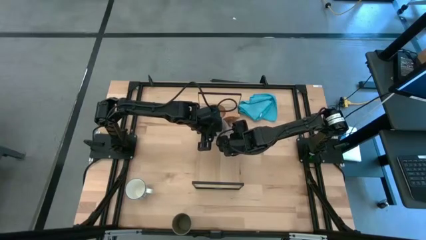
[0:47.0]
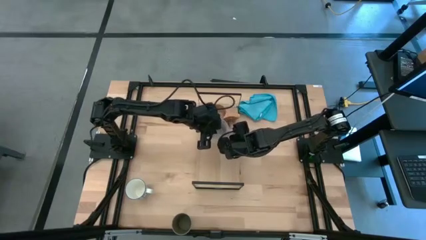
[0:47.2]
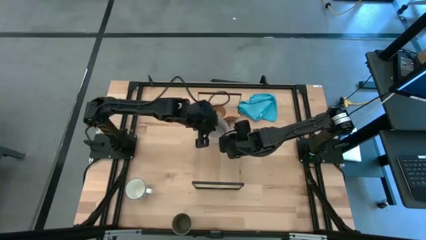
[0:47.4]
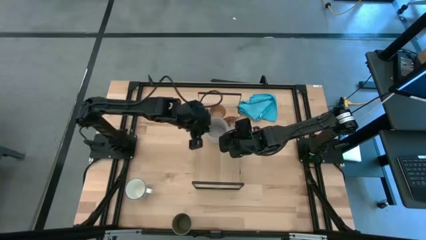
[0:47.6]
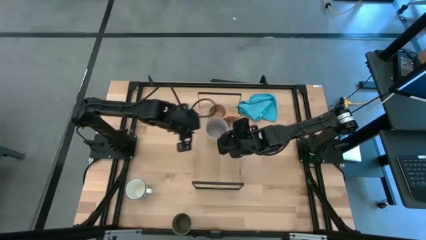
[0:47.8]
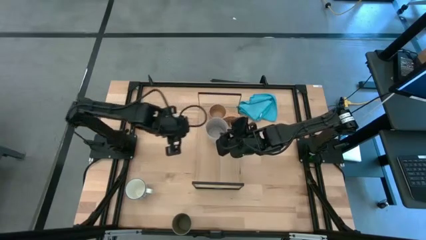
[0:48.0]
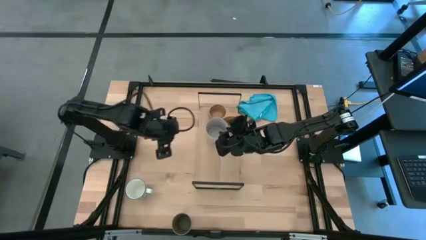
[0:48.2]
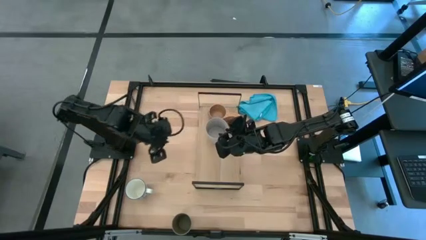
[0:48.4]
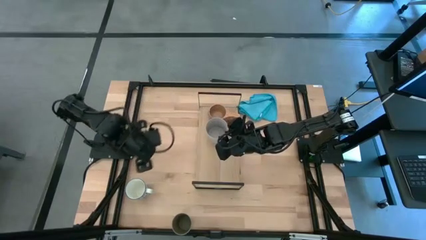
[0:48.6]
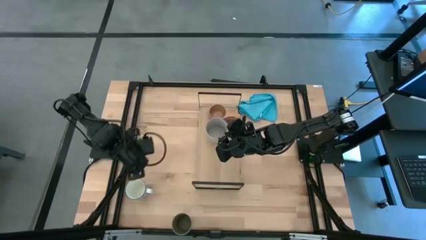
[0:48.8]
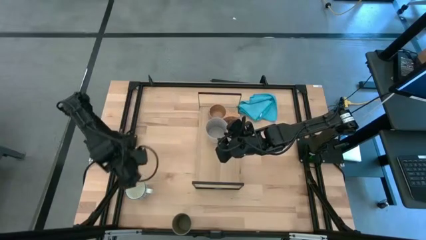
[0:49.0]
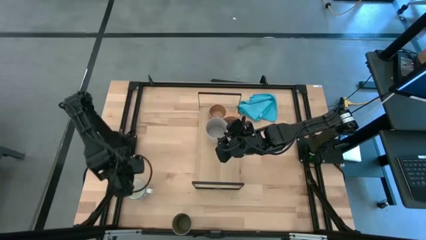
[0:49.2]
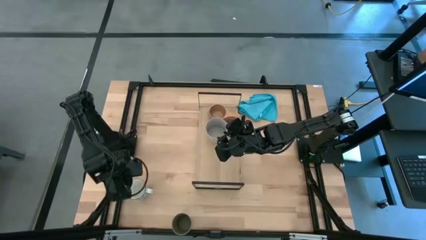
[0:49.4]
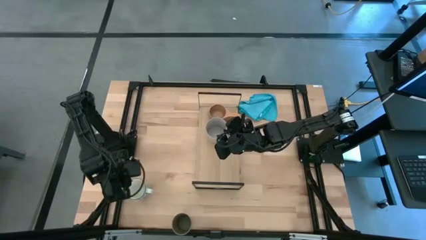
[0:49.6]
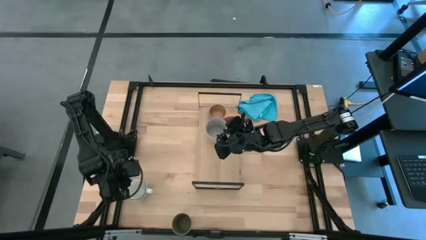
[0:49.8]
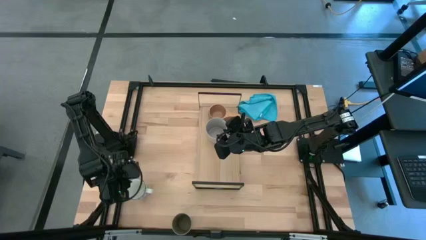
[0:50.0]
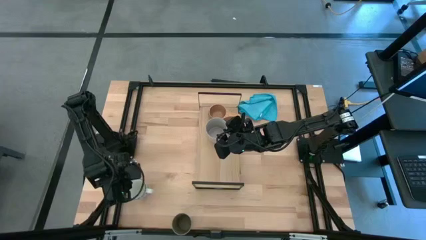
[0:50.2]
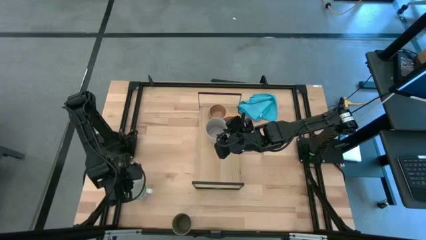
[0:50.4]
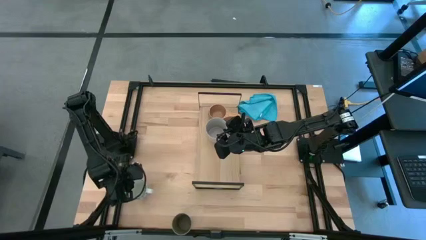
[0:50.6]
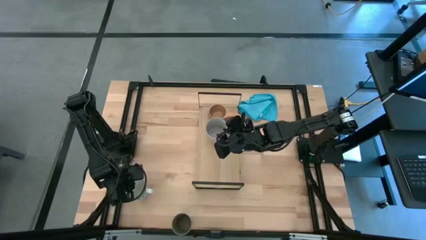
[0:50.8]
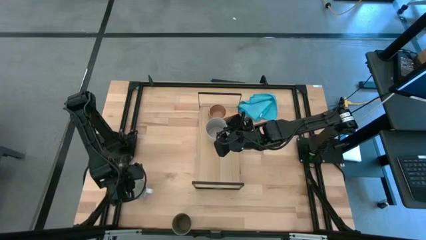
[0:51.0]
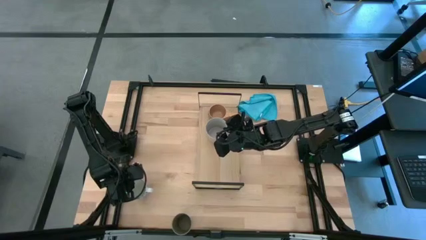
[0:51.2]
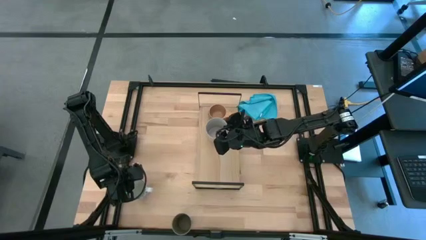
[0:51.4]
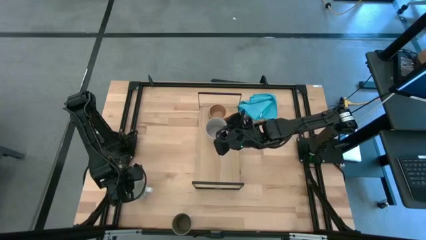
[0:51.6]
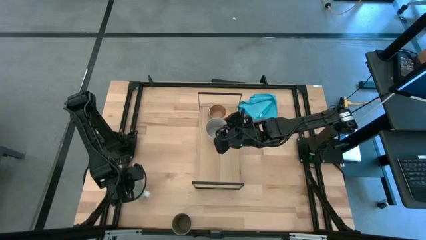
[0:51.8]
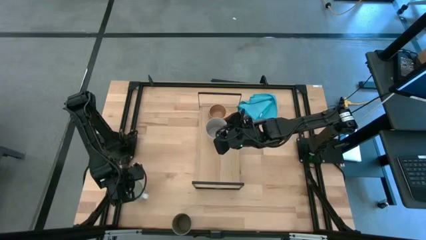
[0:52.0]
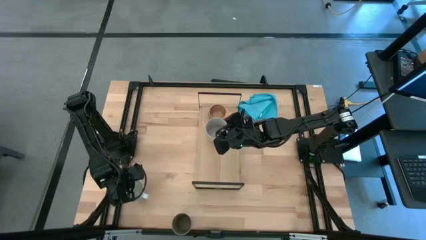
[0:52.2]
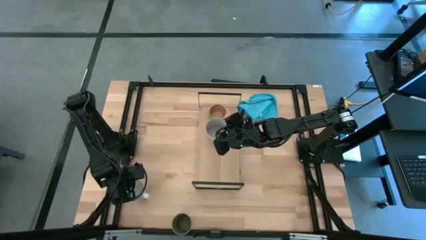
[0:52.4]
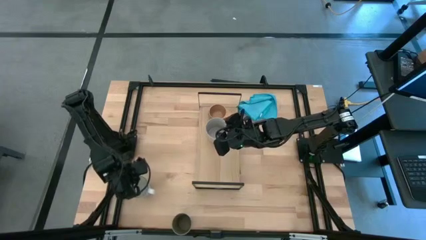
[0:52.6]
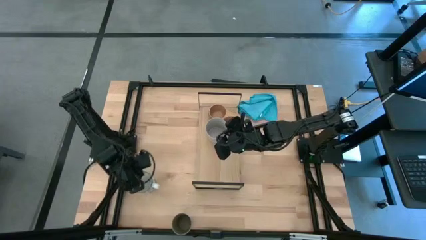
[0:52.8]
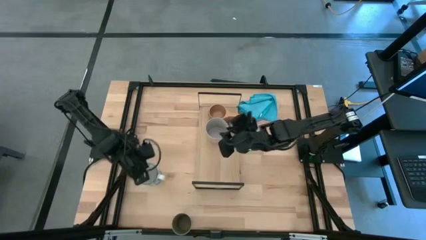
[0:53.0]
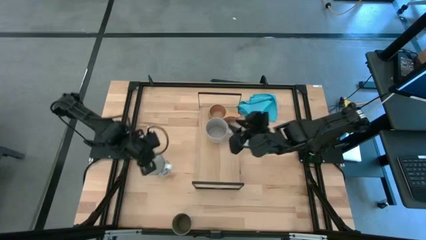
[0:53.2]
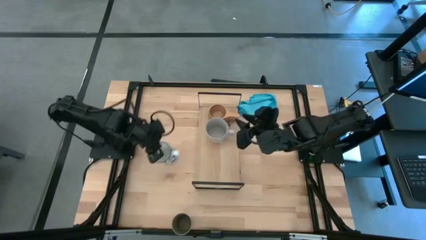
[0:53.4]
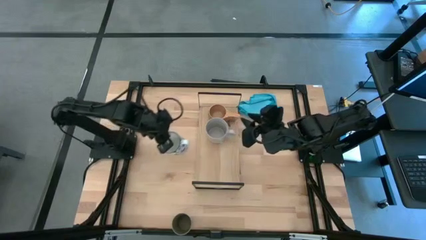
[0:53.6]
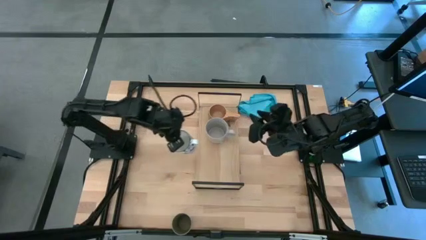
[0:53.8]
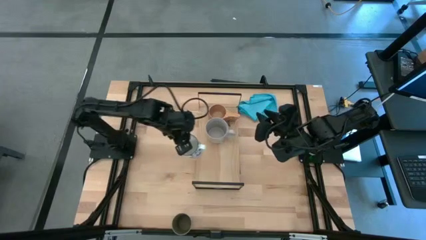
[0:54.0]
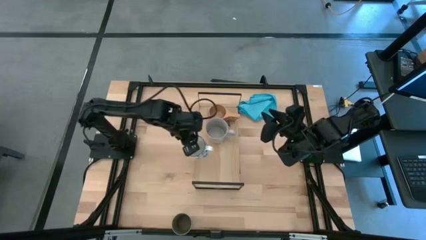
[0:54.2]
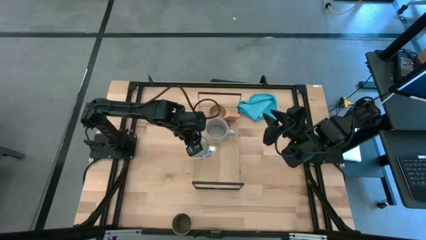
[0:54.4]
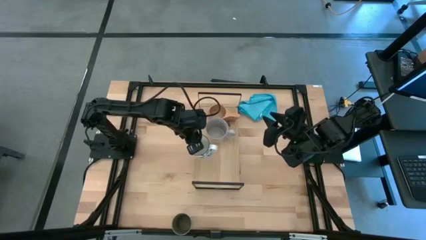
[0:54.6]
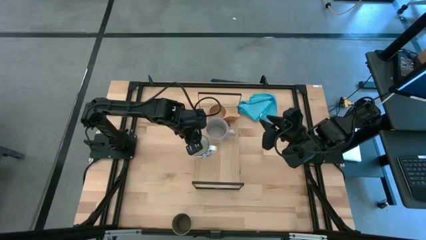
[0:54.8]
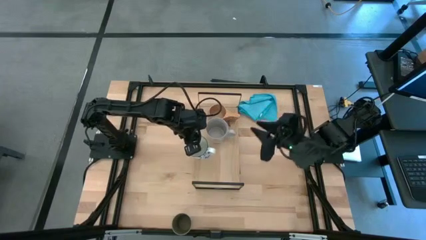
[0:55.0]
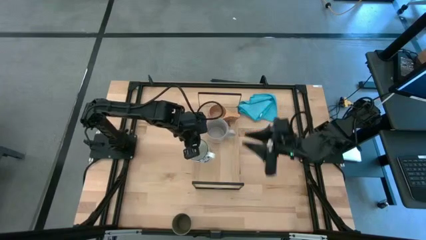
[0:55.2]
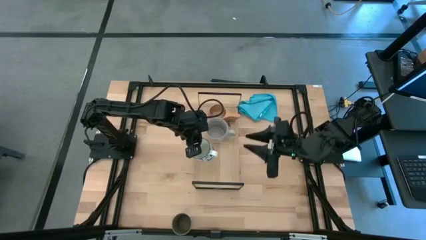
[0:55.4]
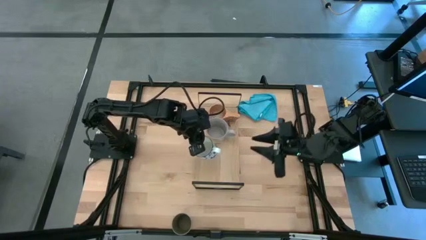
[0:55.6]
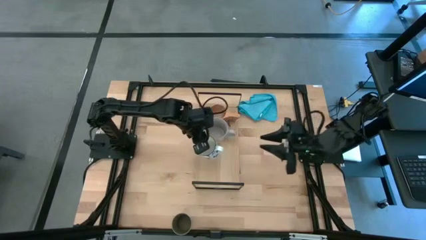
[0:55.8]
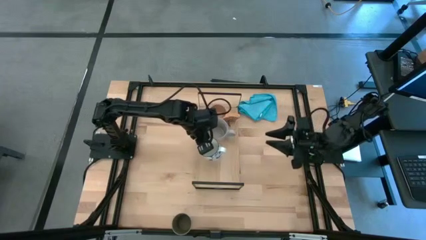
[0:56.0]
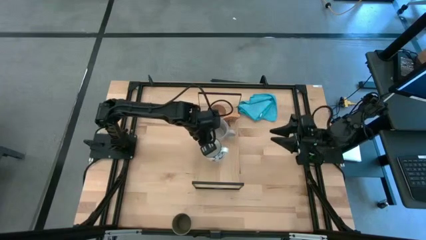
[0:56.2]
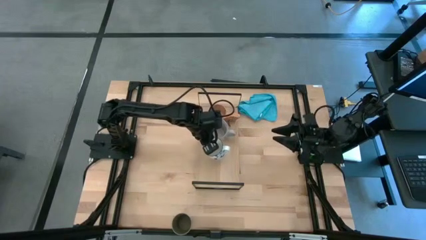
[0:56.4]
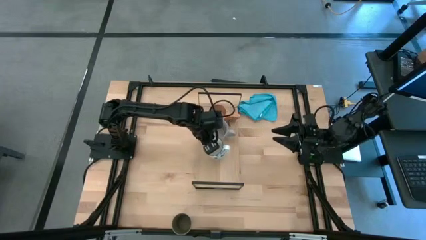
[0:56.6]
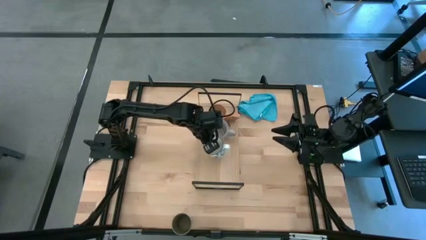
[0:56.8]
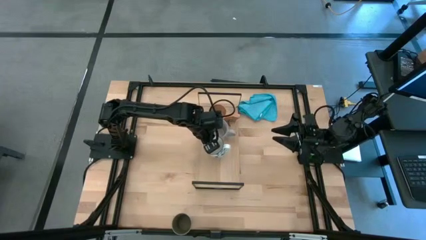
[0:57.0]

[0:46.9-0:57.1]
Task: Stack small to large cups/mugs on shelf
Put the blue mug on the shelf

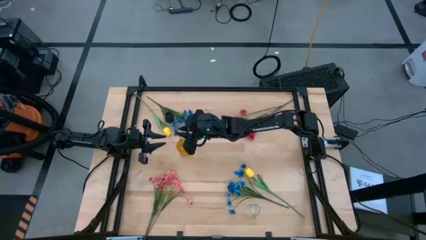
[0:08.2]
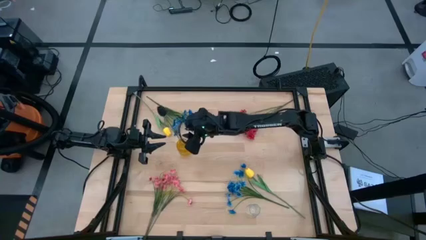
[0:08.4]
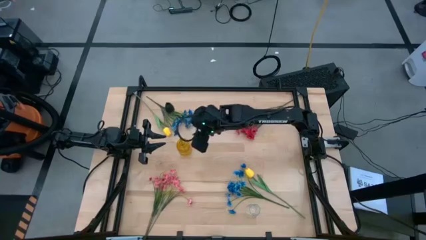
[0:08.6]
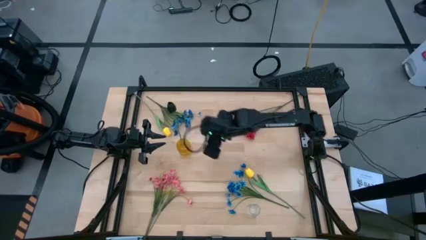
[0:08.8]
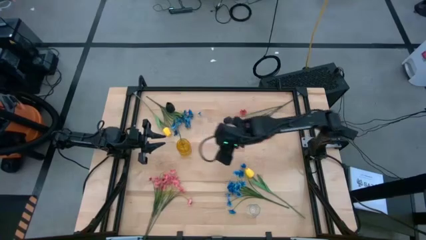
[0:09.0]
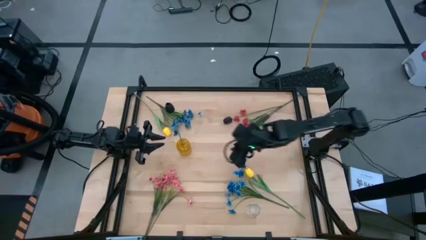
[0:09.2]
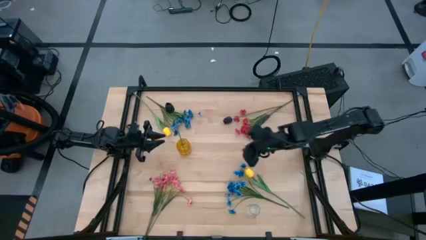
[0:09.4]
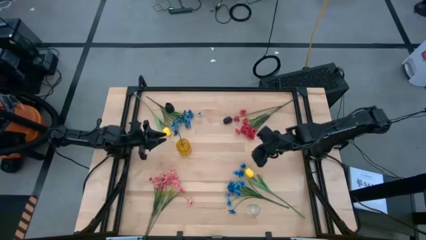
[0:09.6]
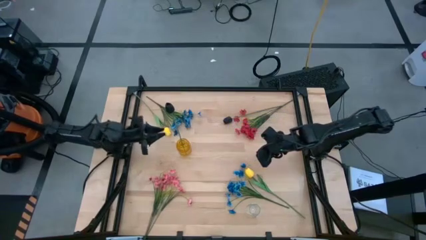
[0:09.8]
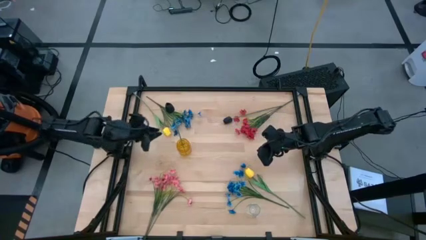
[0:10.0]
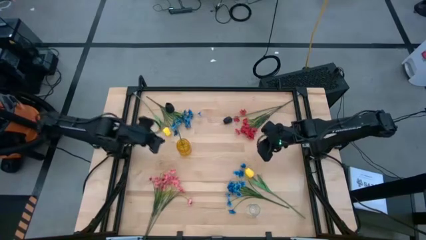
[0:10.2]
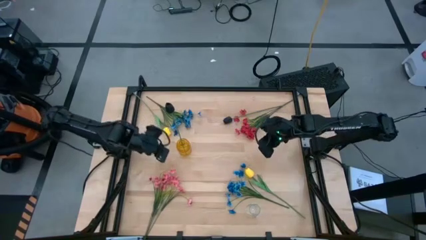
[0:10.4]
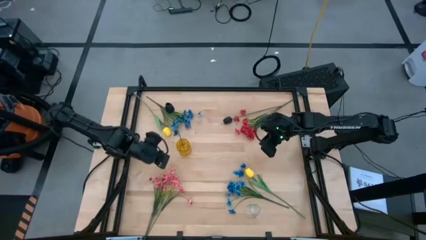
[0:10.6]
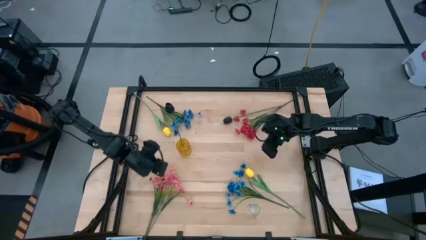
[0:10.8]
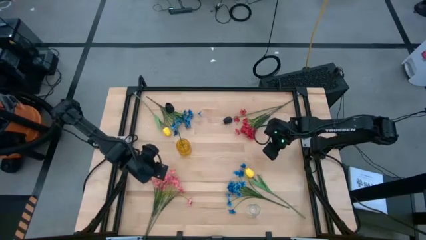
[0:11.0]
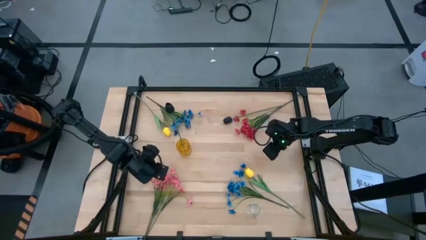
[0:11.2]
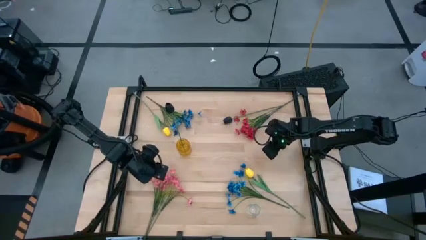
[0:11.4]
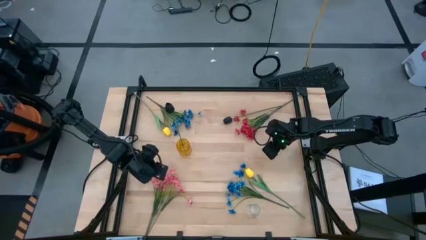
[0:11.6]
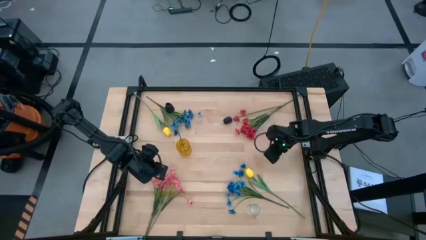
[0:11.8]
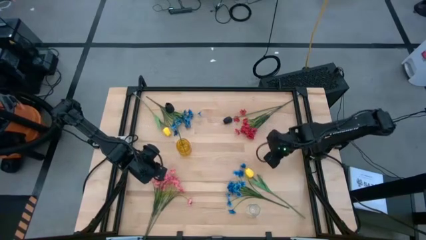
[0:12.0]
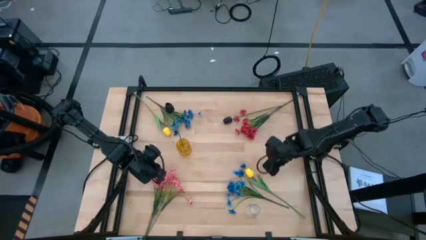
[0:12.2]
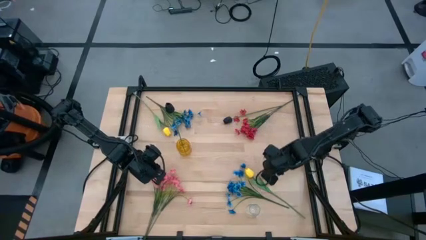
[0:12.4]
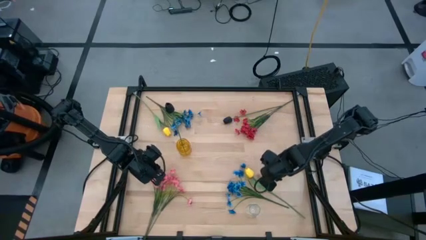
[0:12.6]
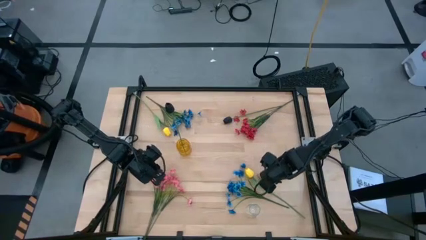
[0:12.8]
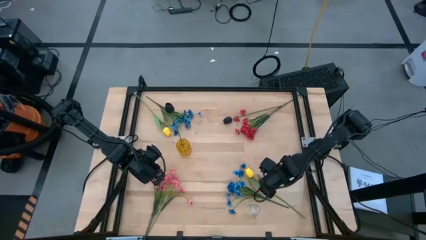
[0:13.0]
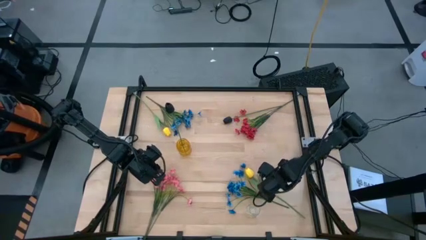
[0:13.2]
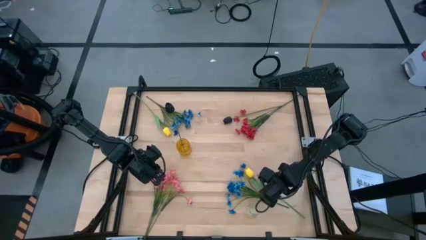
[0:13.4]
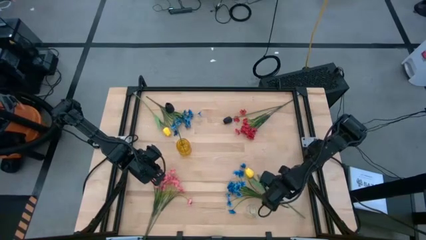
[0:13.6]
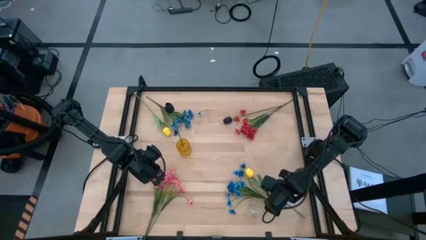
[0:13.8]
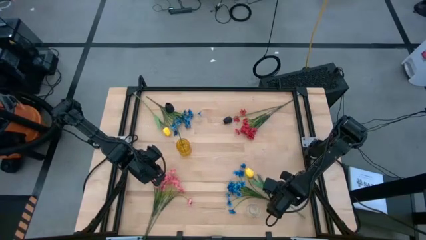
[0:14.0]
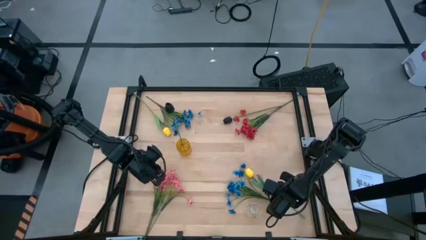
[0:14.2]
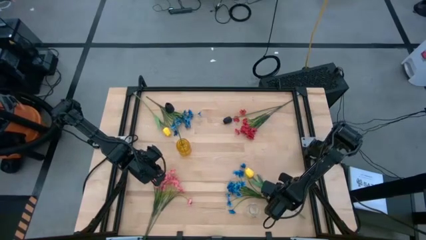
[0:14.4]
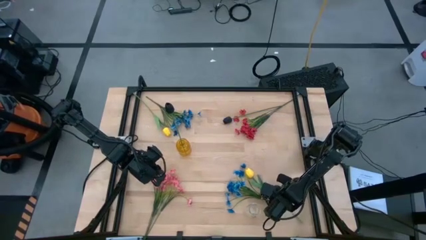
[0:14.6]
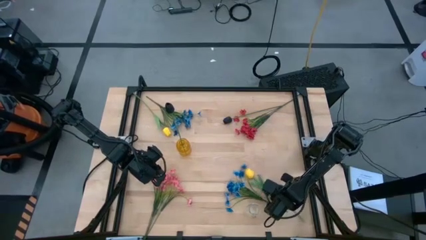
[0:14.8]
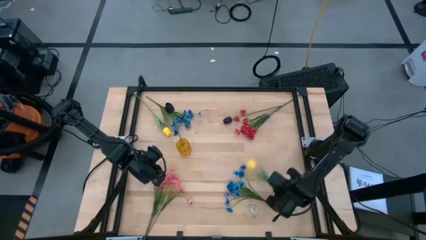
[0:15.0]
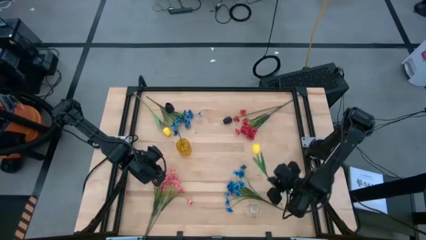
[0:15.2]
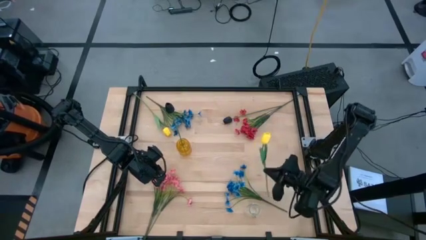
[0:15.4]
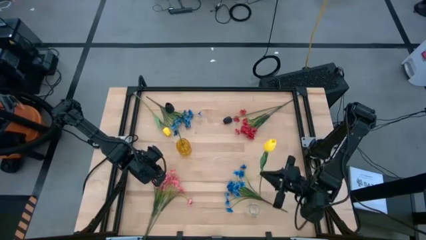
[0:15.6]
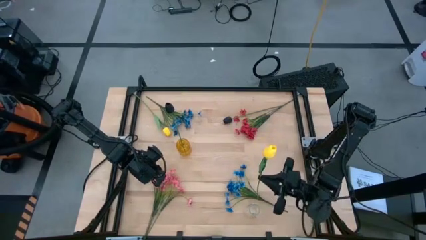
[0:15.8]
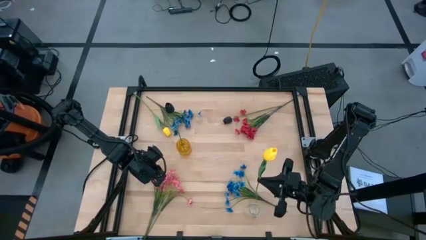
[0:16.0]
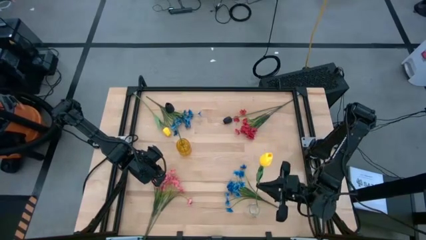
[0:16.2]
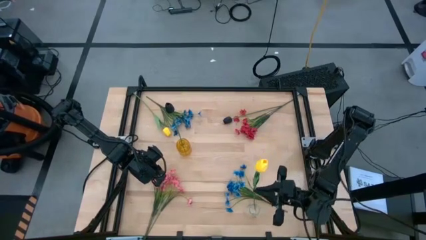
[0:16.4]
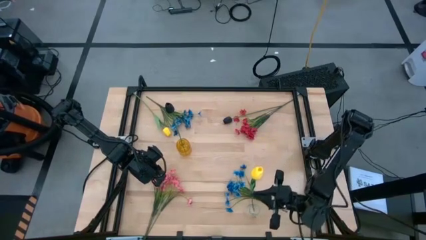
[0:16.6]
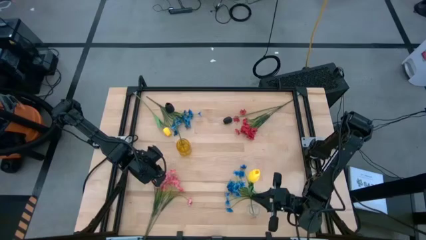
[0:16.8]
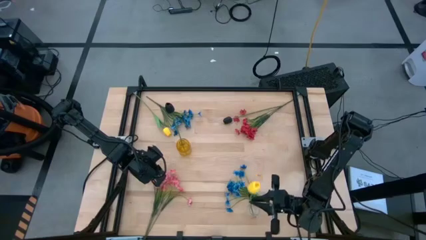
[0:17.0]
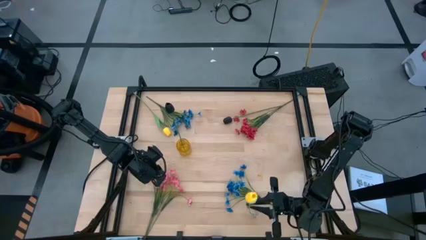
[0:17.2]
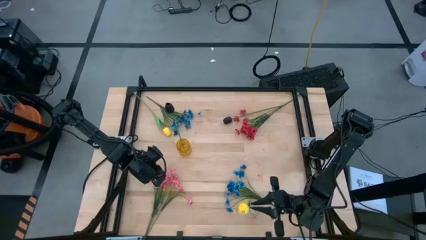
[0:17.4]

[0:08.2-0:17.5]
Task: Sort flowers into vase by color
Put the bottom yellow flower into the transparent vase
